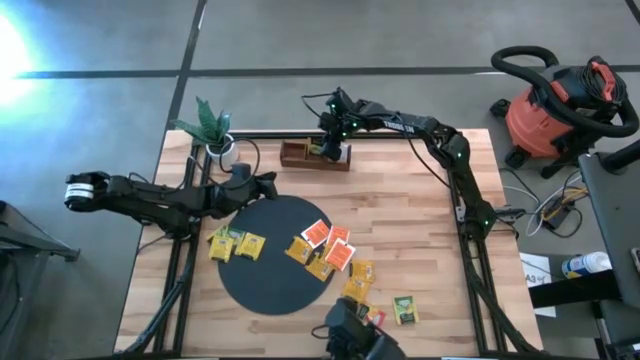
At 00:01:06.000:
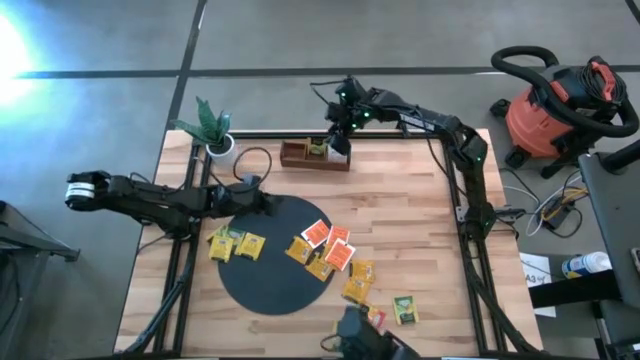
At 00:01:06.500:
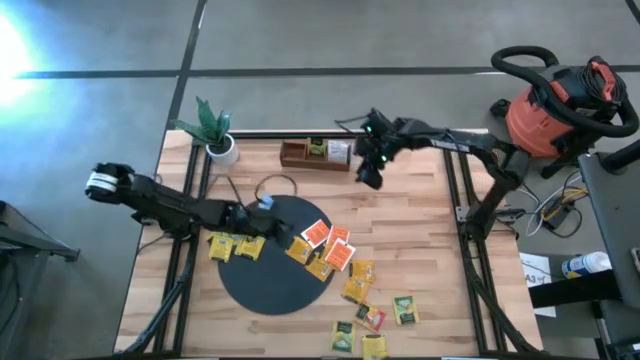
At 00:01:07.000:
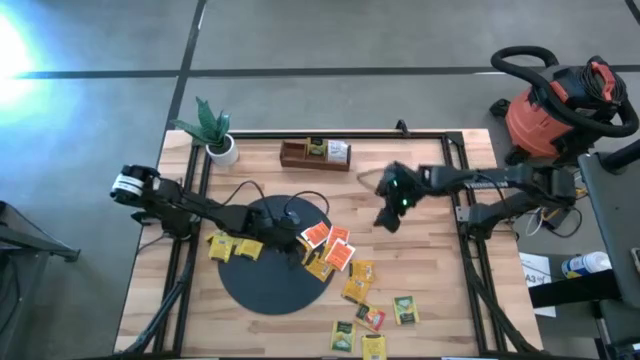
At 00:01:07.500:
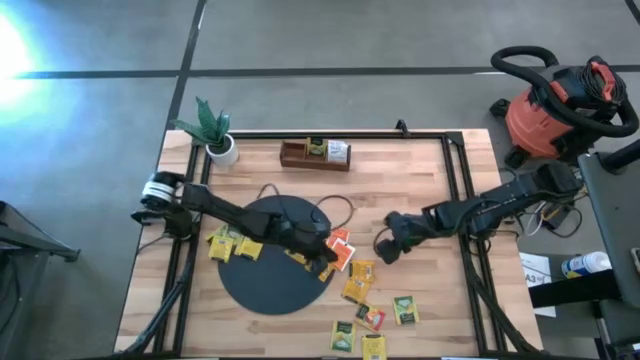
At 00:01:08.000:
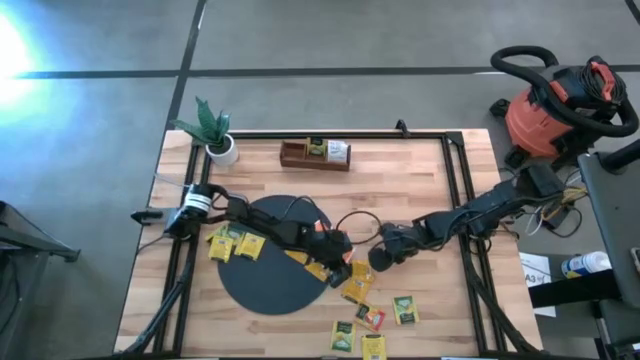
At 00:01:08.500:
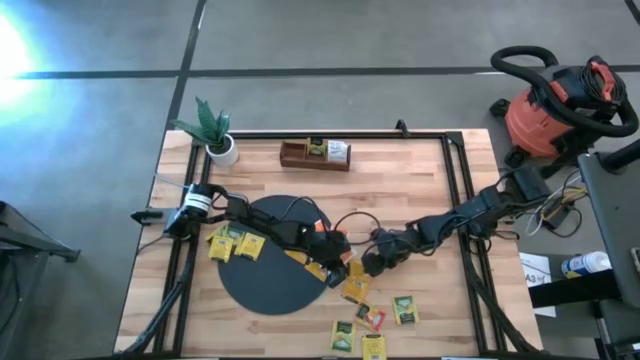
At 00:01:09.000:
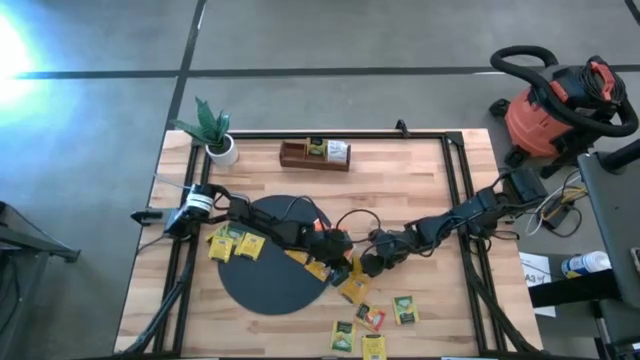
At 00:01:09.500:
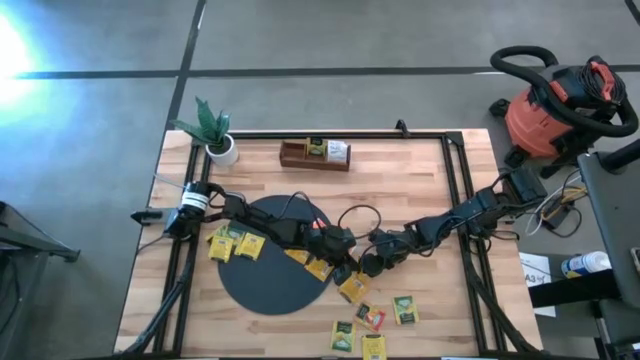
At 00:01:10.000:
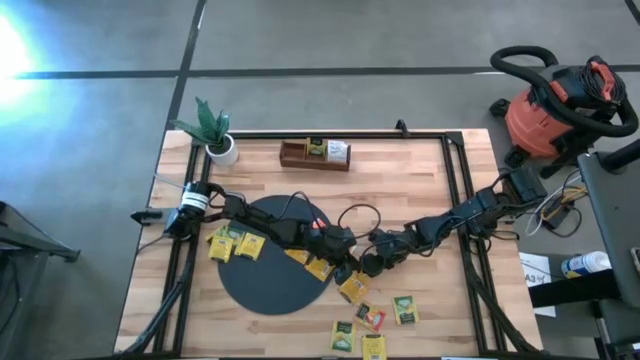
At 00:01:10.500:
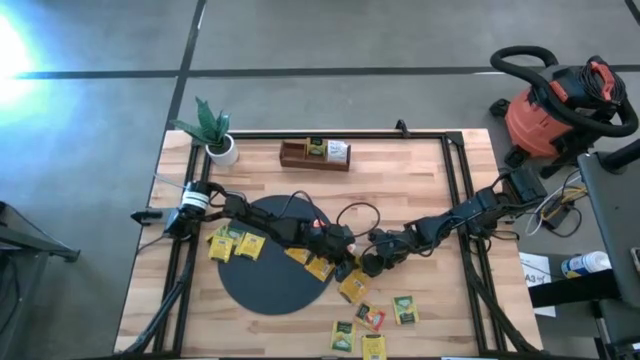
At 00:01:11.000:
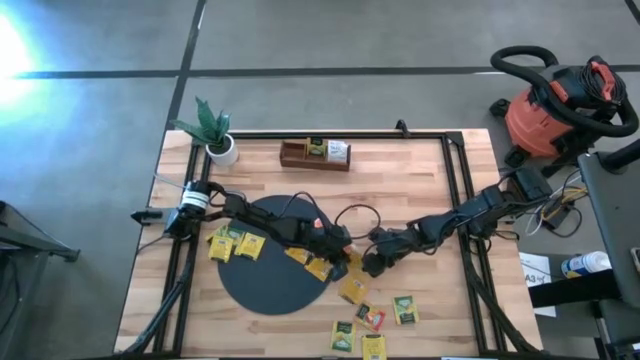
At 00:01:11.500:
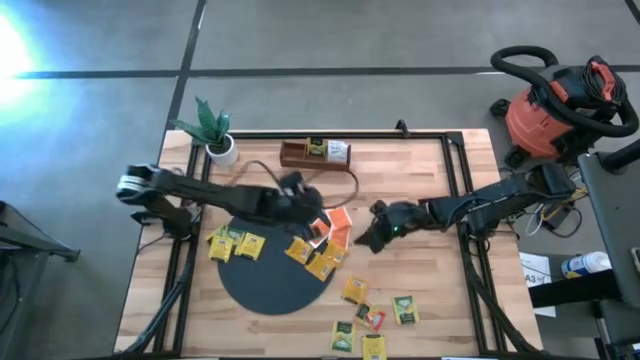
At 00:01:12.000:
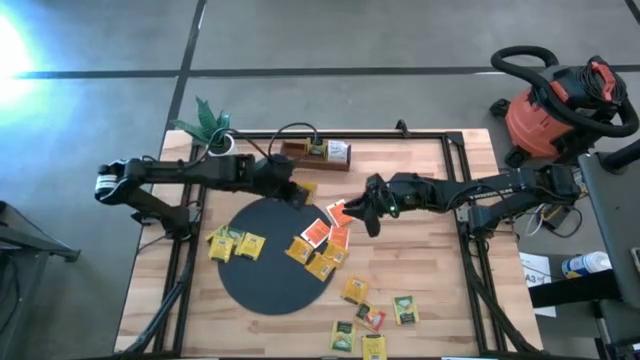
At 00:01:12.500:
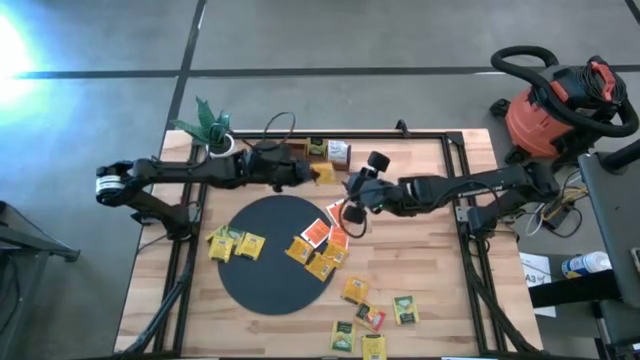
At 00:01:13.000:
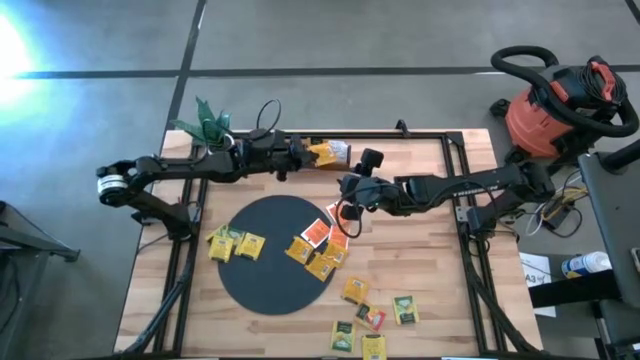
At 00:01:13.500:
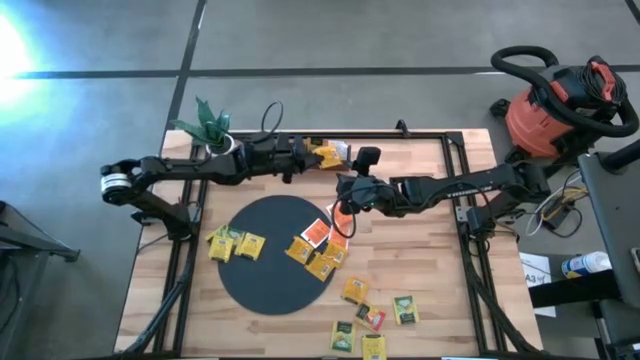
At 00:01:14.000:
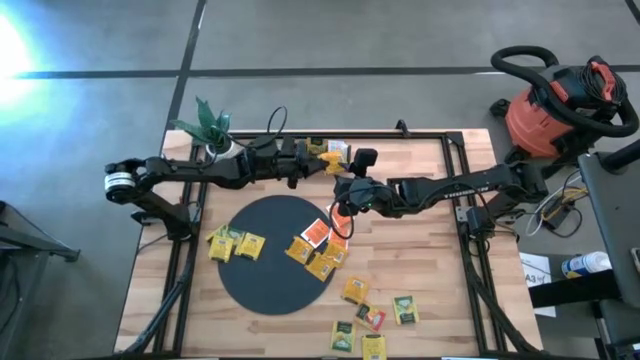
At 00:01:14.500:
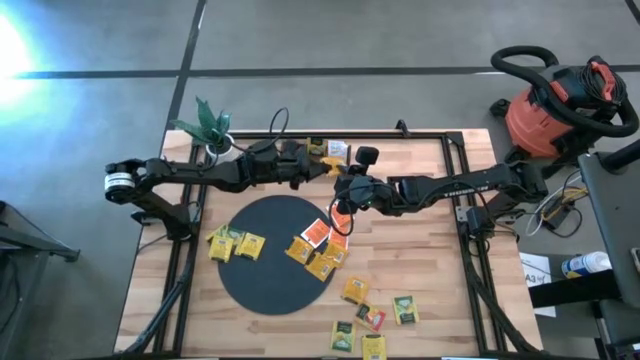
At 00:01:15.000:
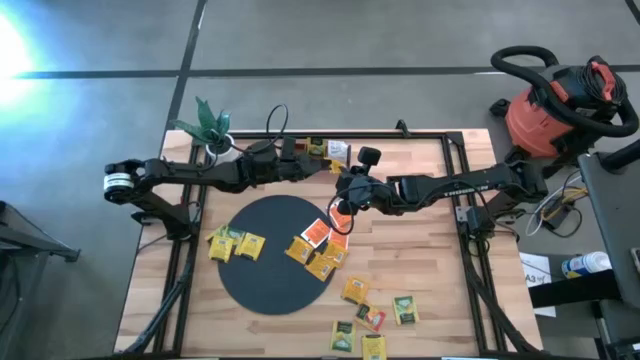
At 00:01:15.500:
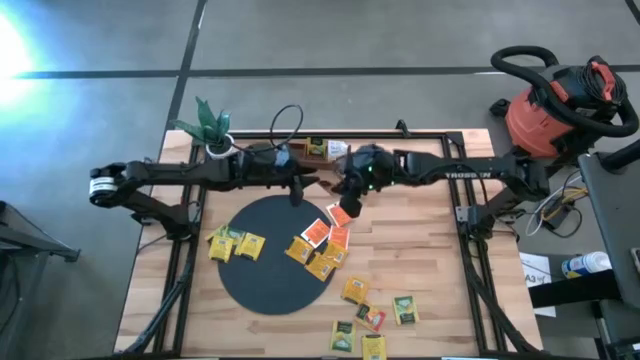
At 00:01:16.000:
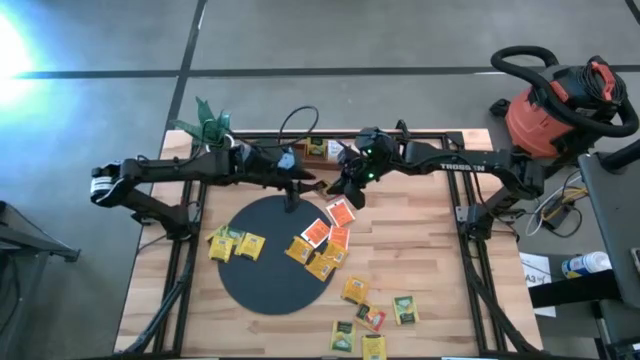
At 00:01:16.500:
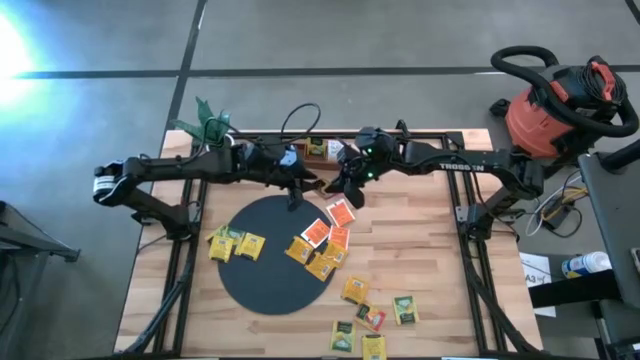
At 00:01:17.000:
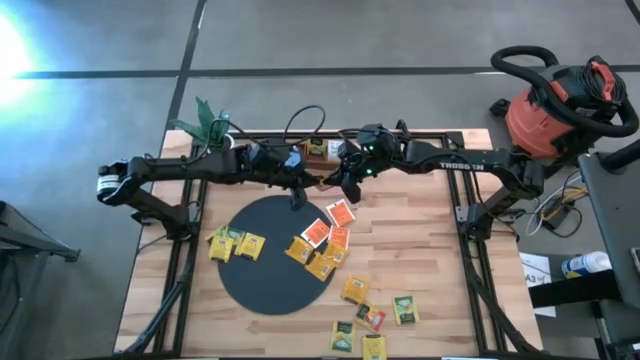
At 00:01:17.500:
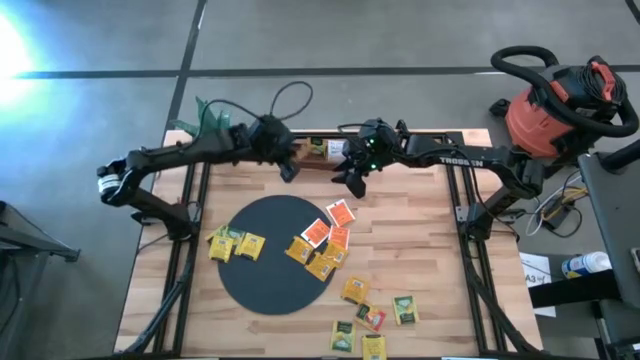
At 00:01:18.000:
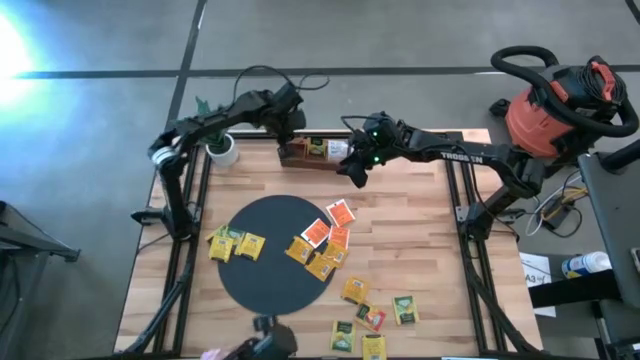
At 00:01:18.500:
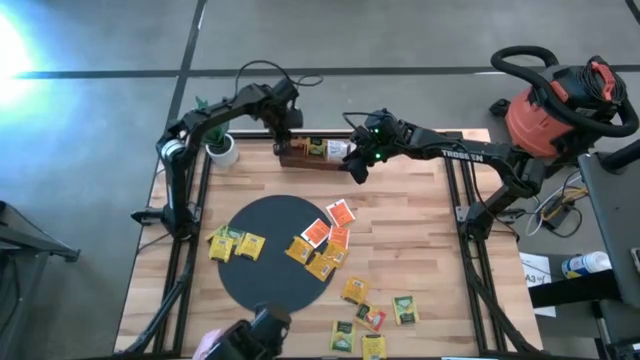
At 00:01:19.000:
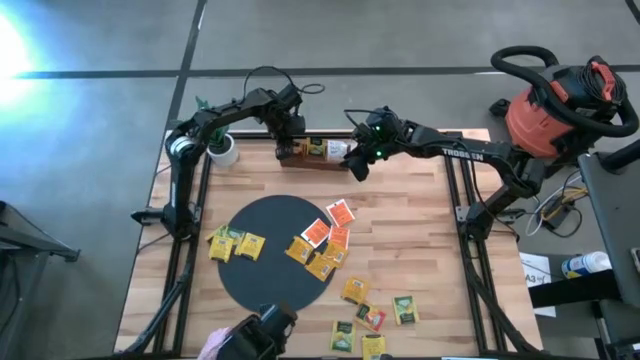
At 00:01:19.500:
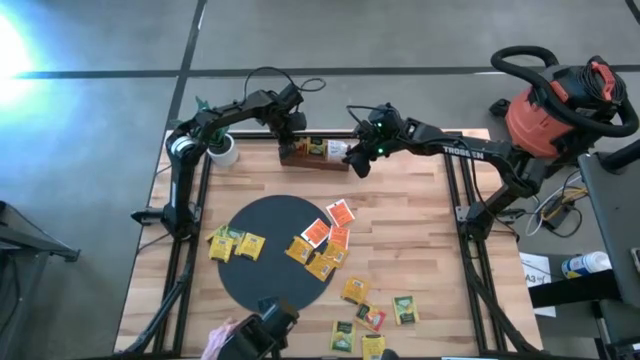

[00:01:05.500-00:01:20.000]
Task: Pick & Place Tea
Put the orange tea bag into the left section of the wooden organizer

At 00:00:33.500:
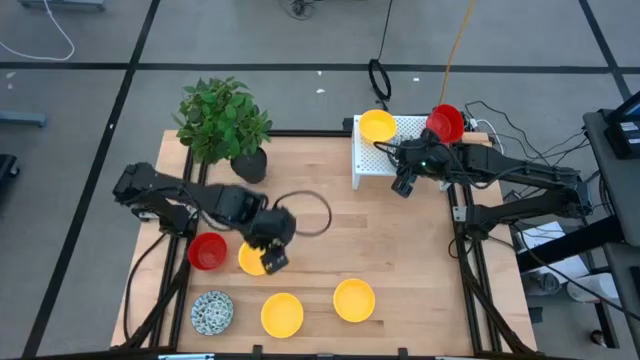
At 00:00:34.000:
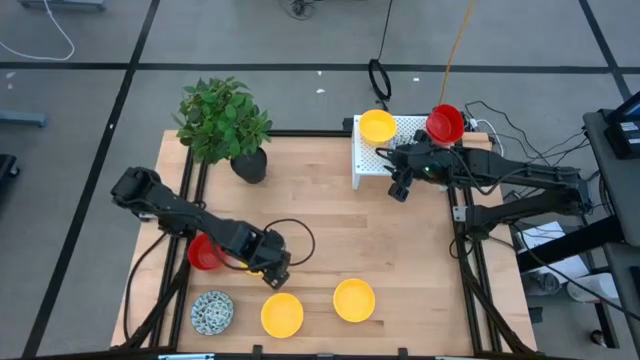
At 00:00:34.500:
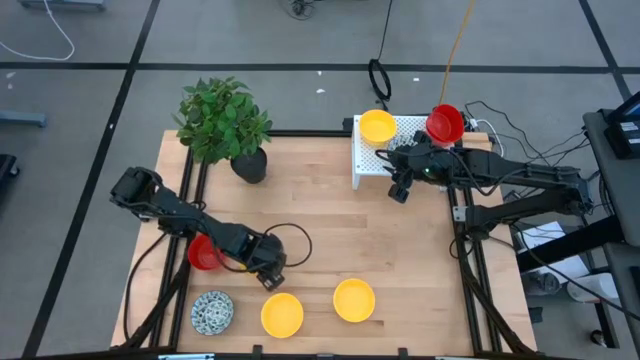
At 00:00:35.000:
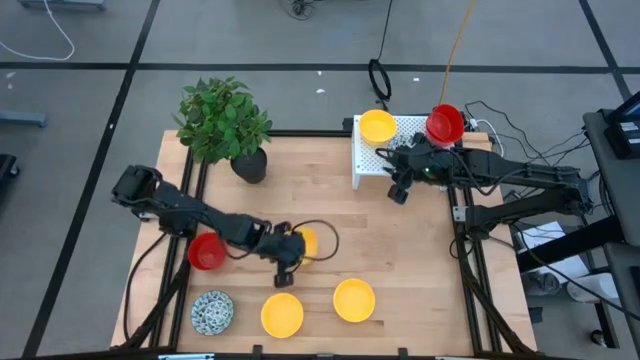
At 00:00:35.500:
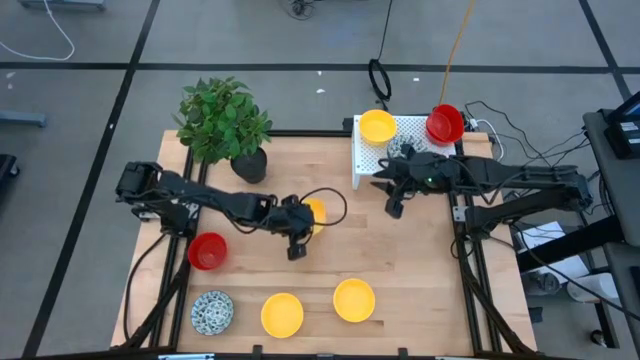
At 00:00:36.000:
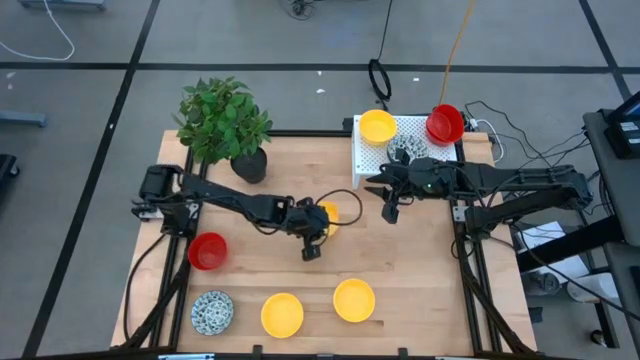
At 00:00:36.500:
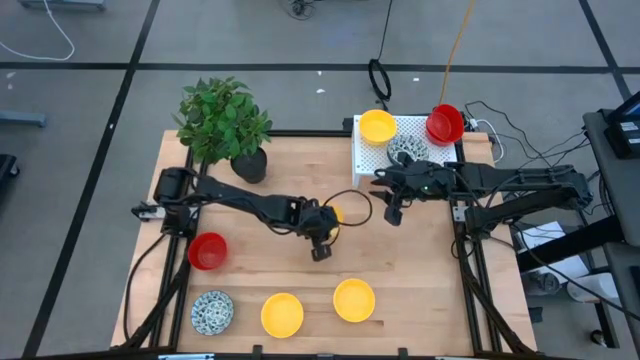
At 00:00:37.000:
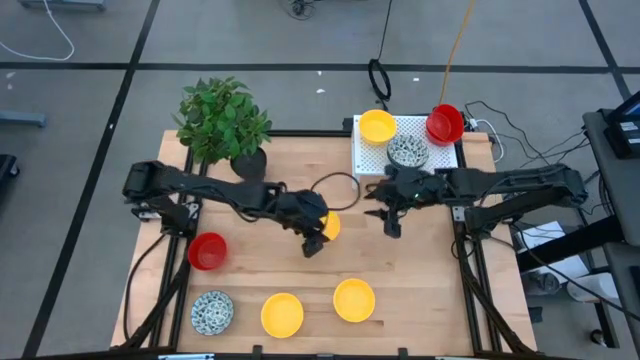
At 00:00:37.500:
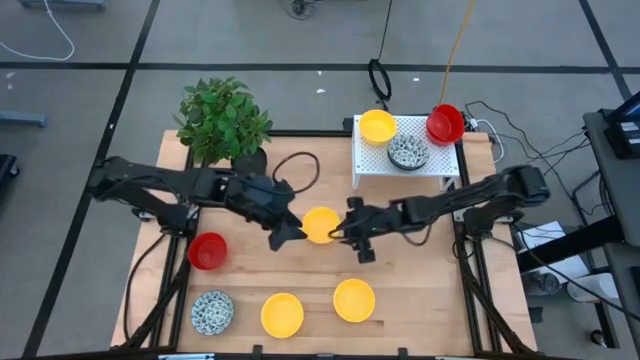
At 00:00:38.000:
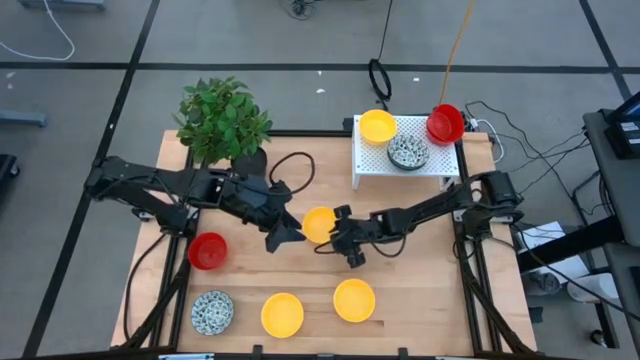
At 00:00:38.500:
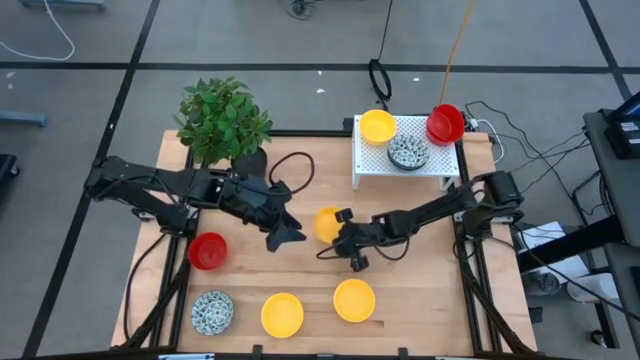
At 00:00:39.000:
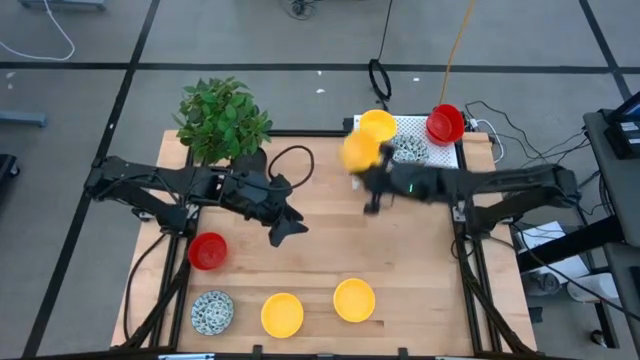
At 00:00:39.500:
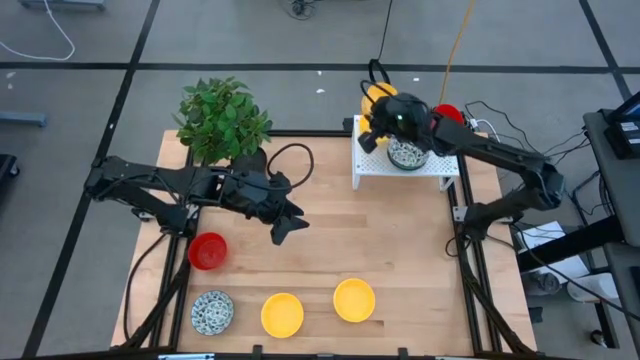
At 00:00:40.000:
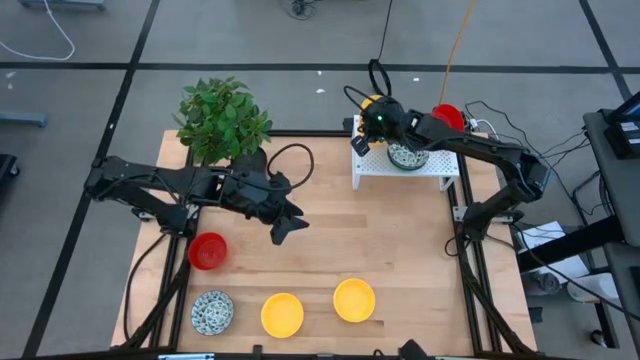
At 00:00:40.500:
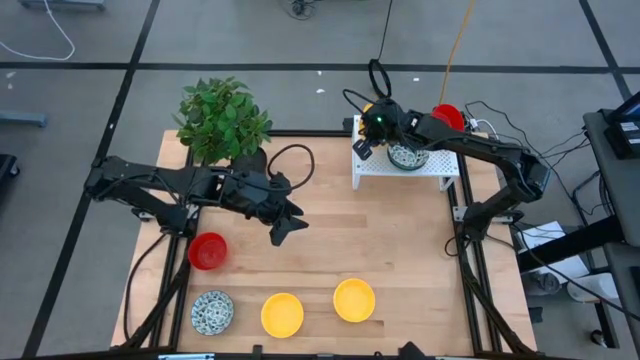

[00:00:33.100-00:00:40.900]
Task: Pick & Place Mini bowls
Stack the yellow bowl on top of the yellow bowl on the shelf
